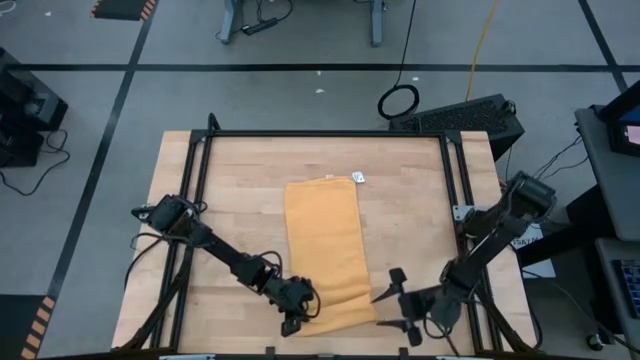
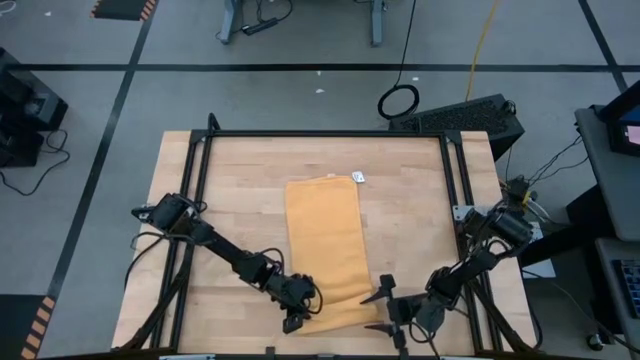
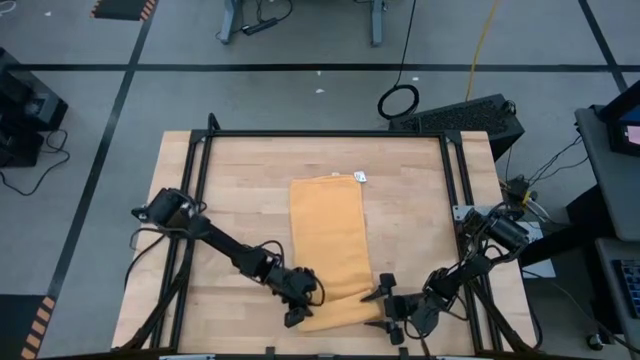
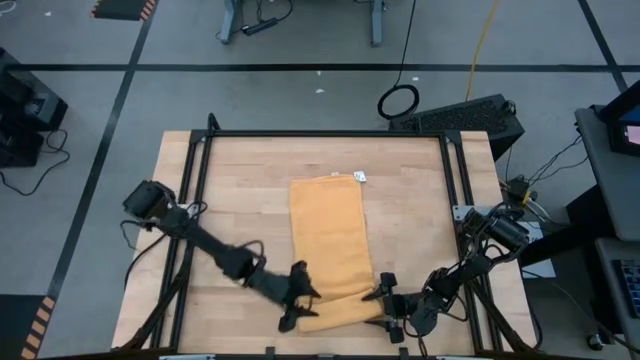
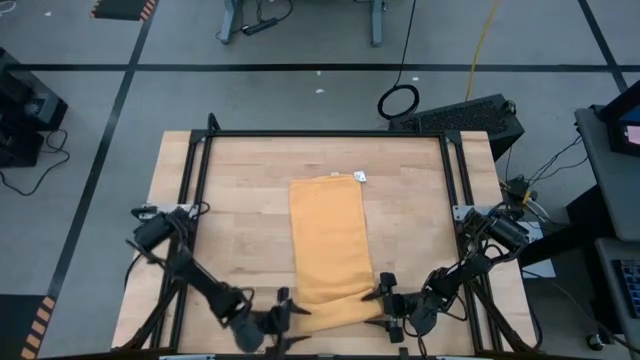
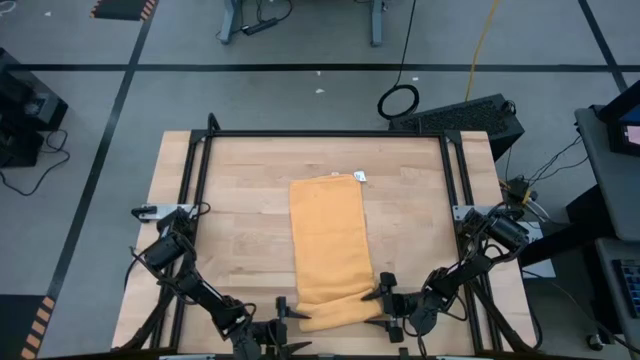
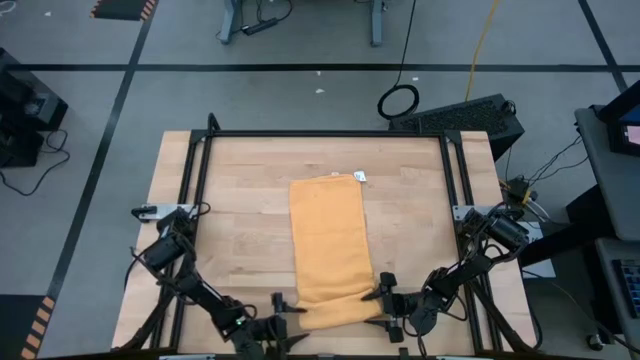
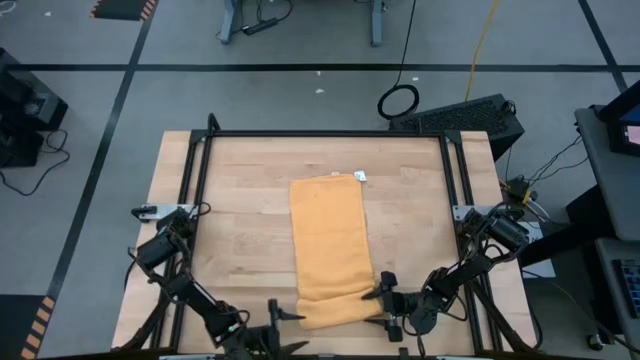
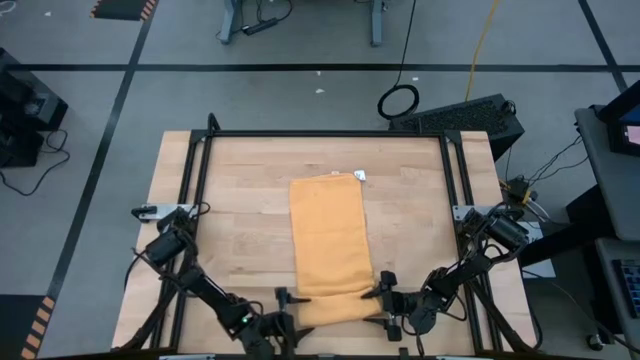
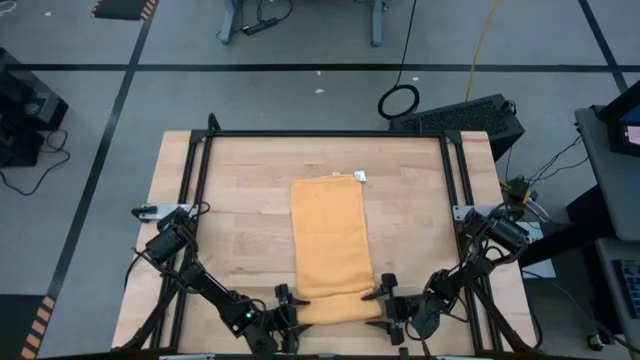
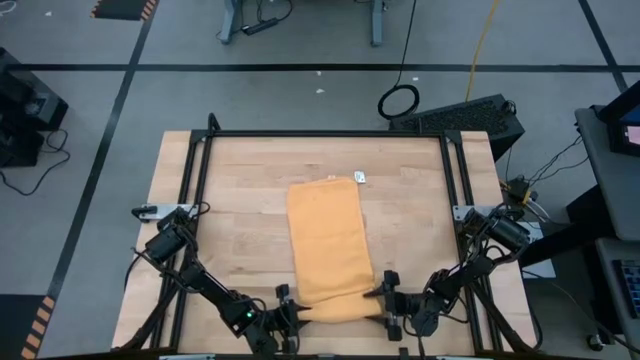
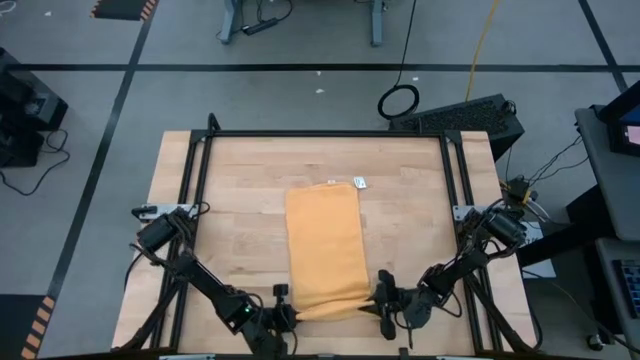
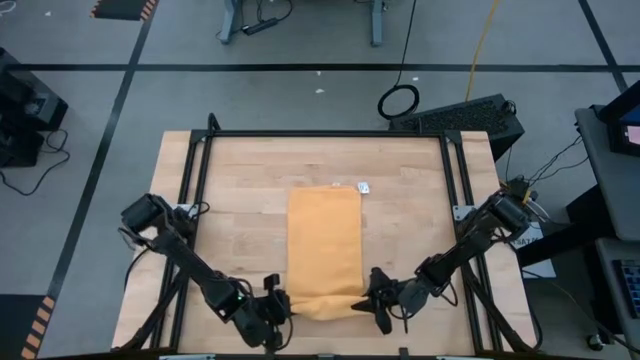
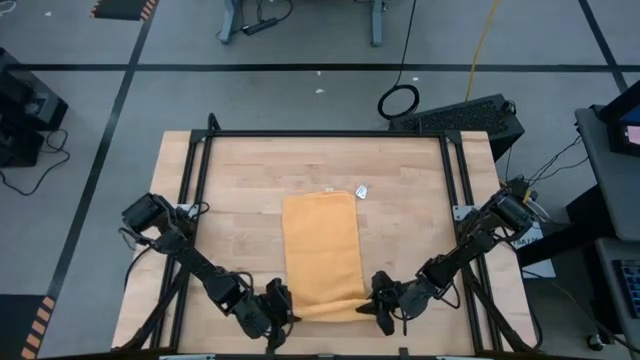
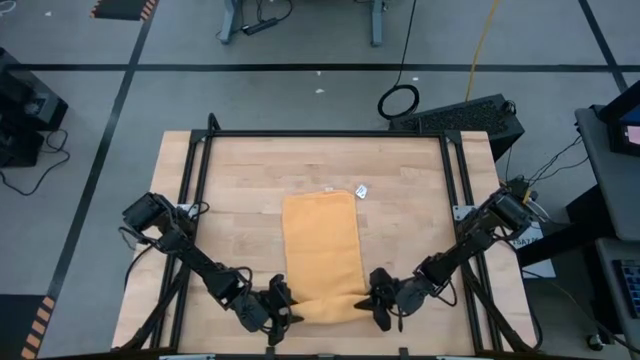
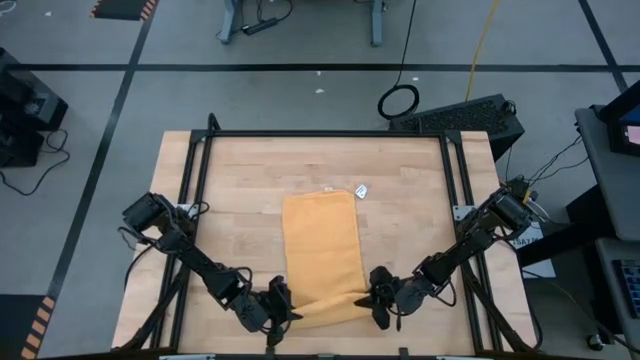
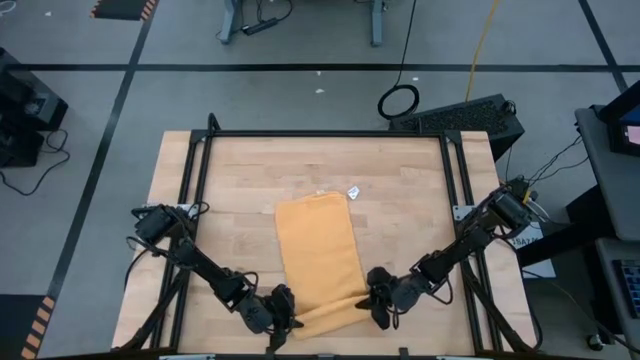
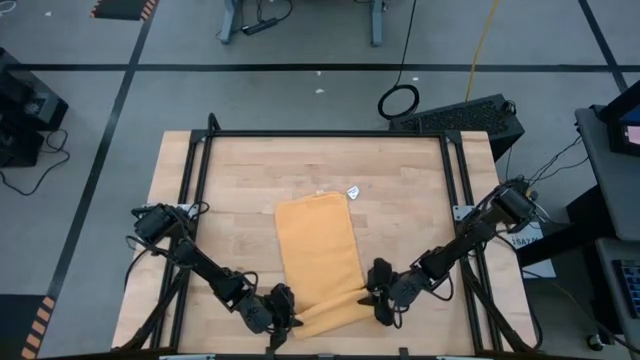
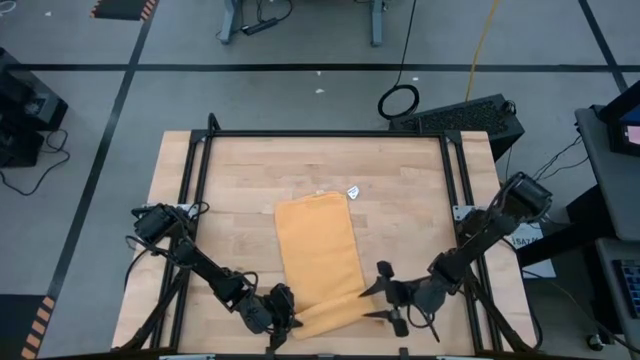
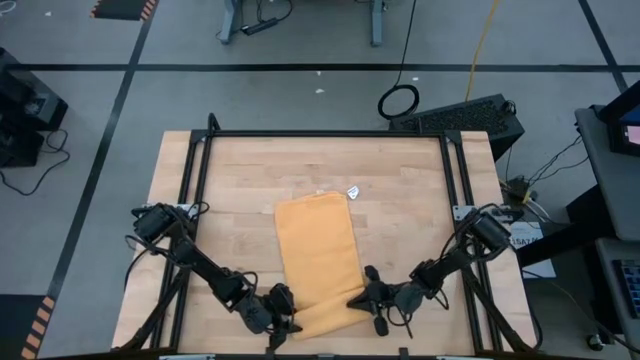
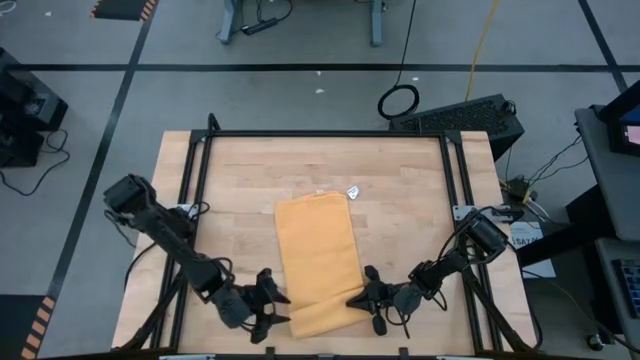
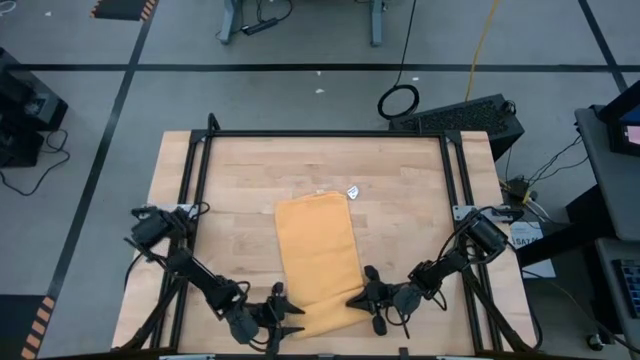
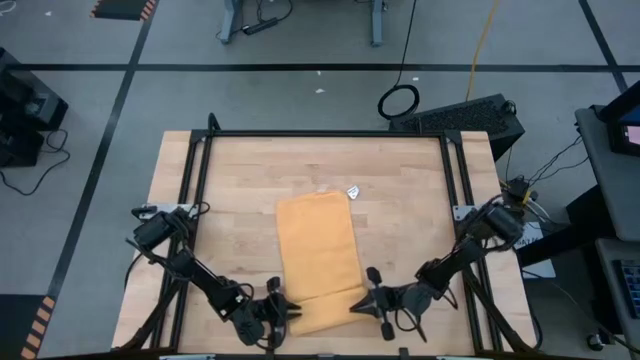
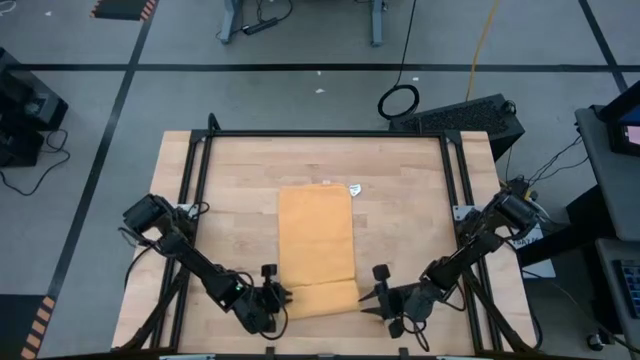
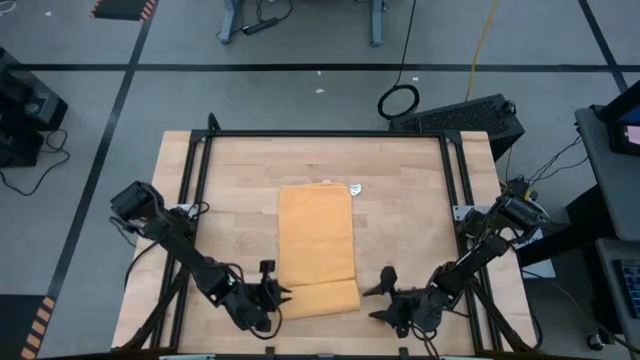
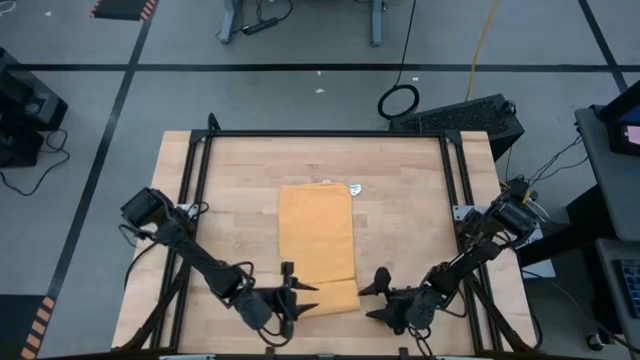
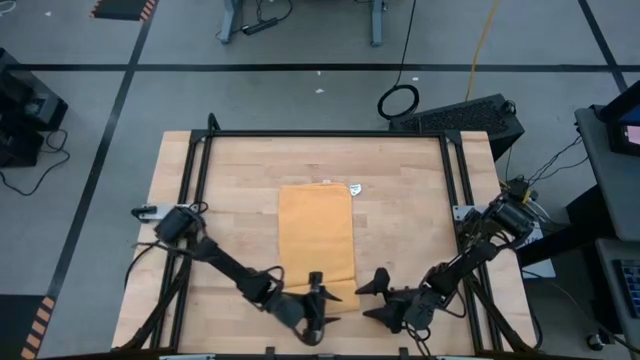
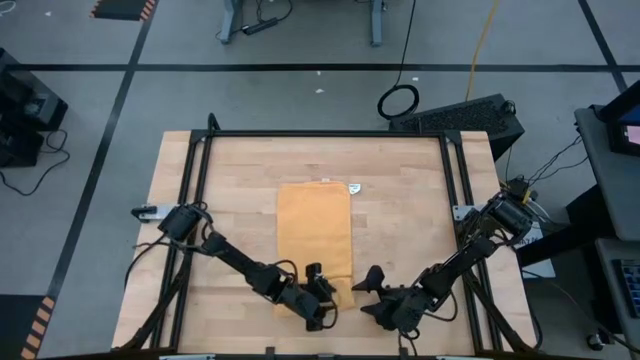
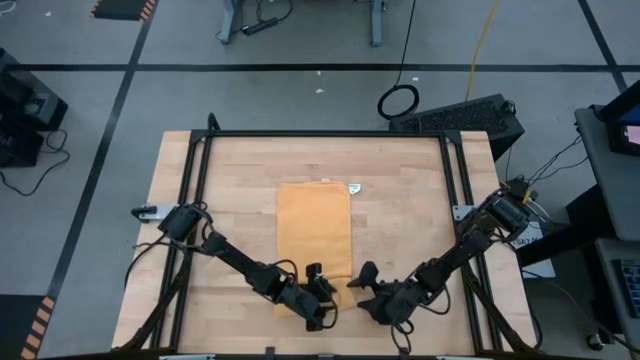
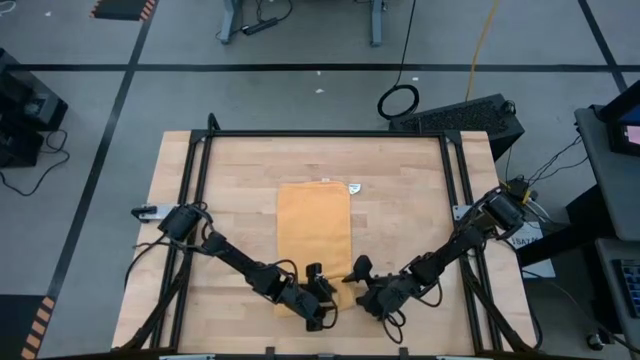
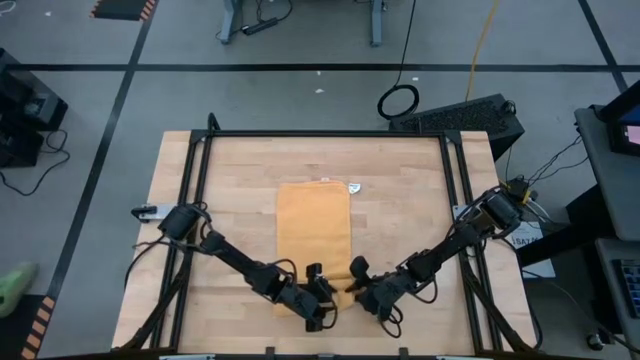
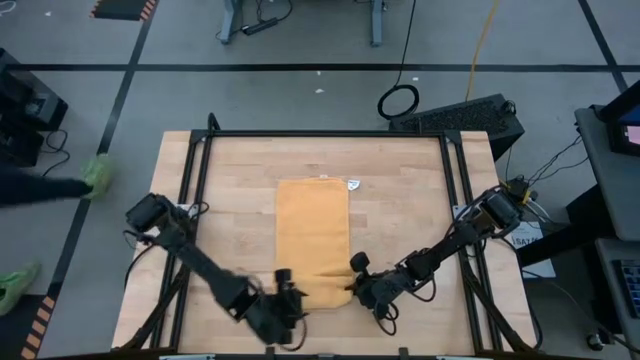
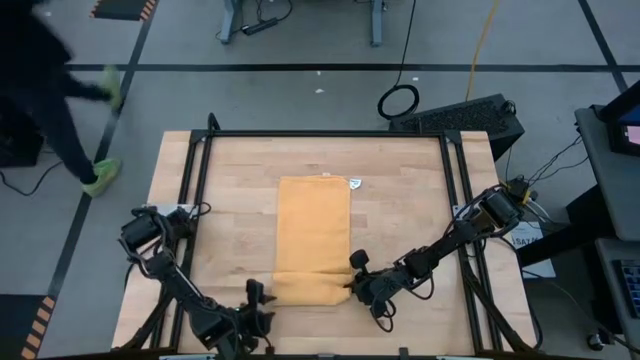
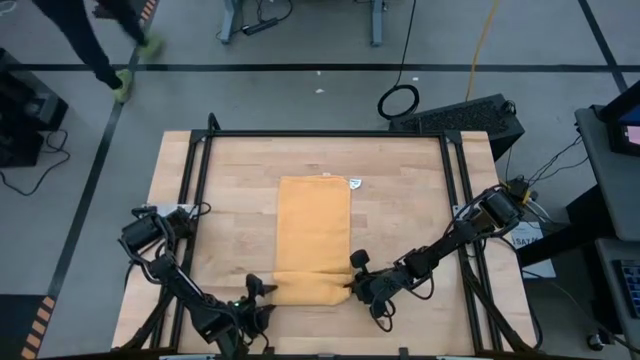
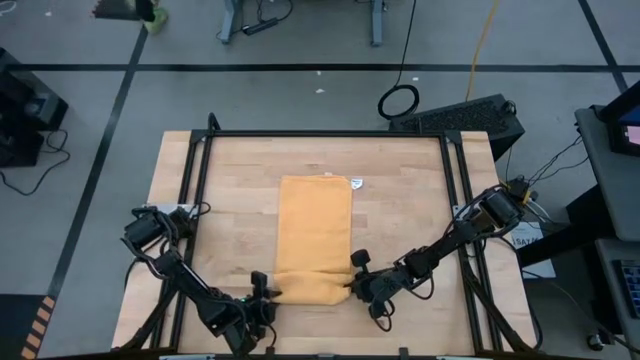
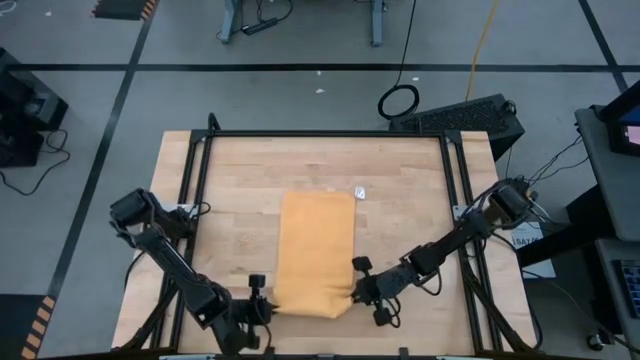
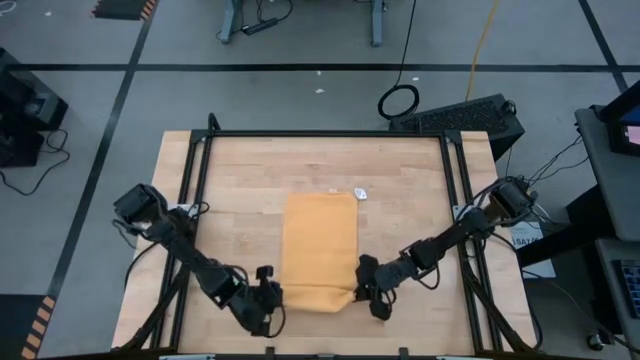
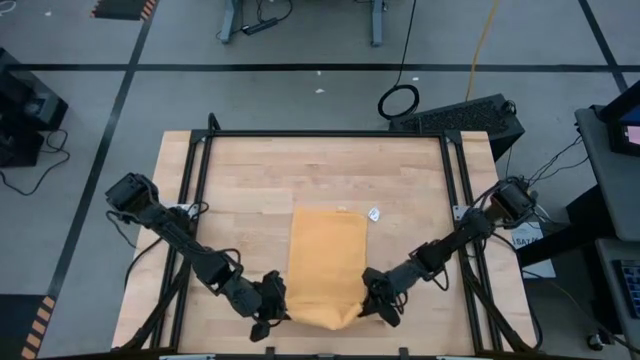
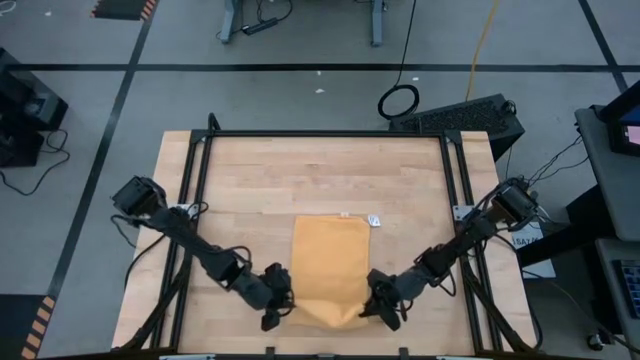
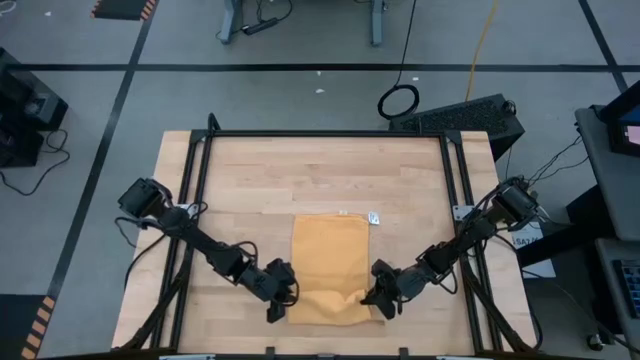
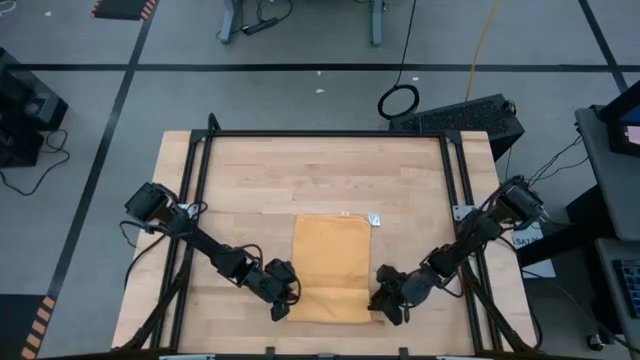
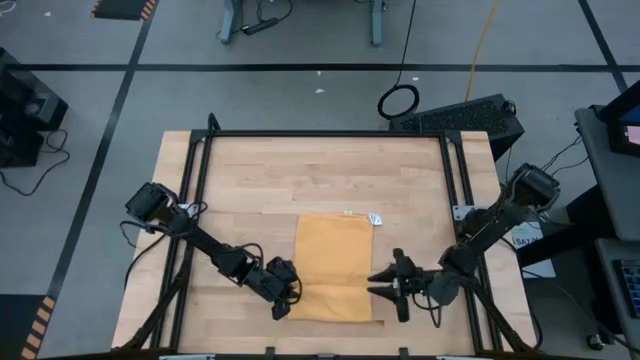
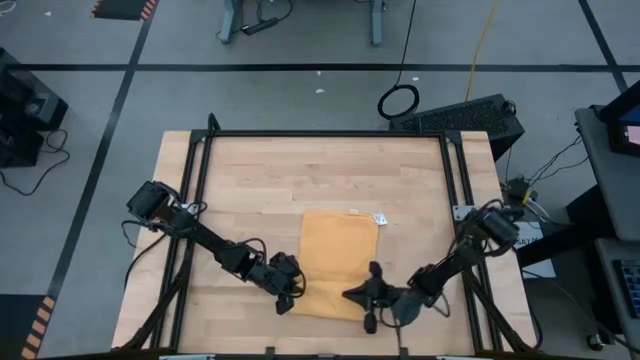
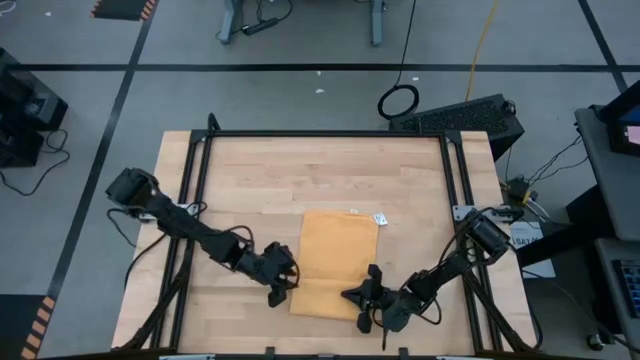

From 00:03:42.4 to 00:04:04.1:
Task: Roll towel
Roll the yellow towel
